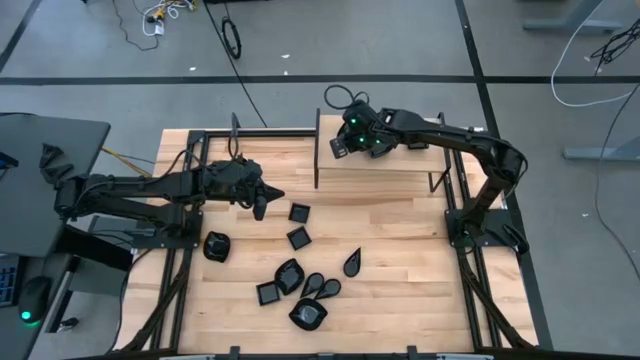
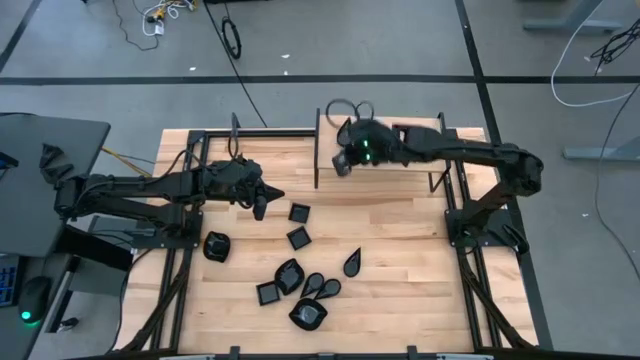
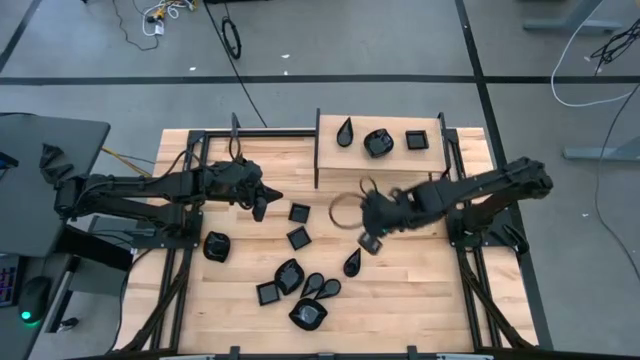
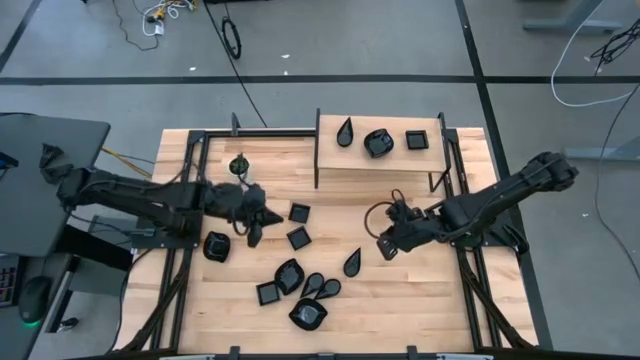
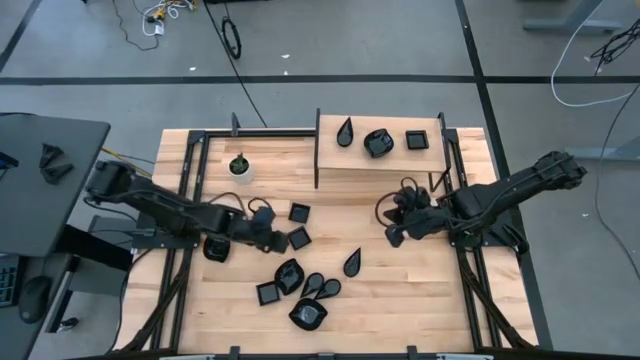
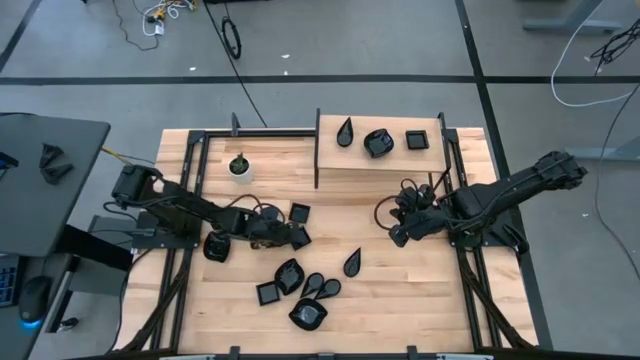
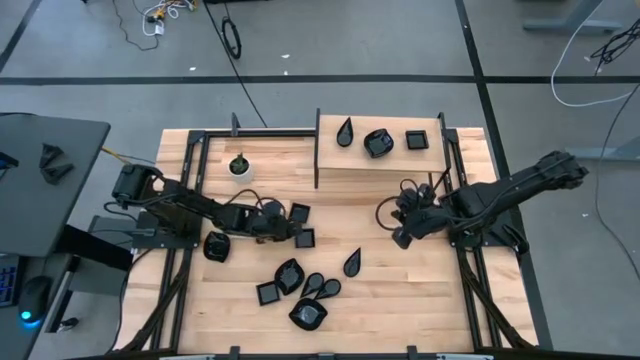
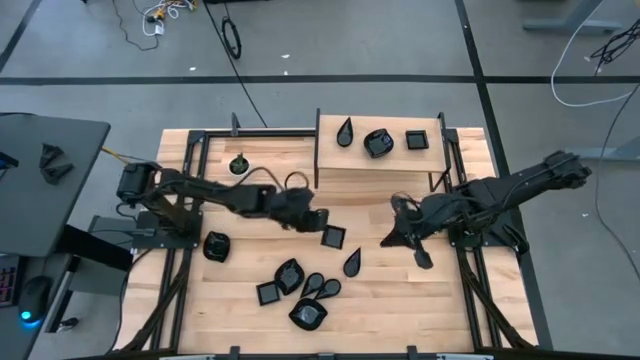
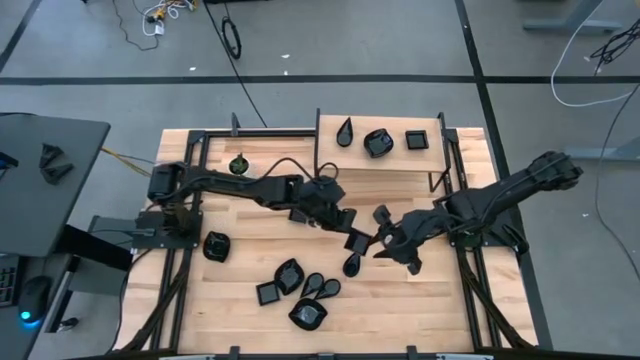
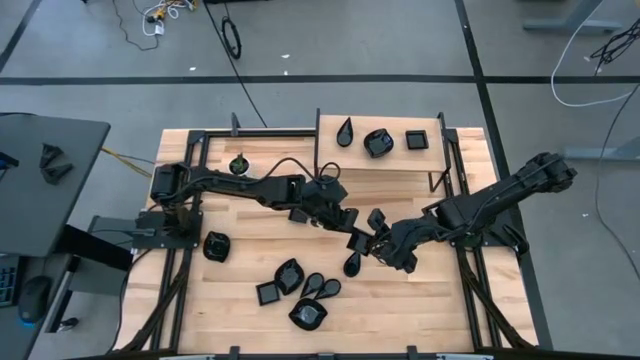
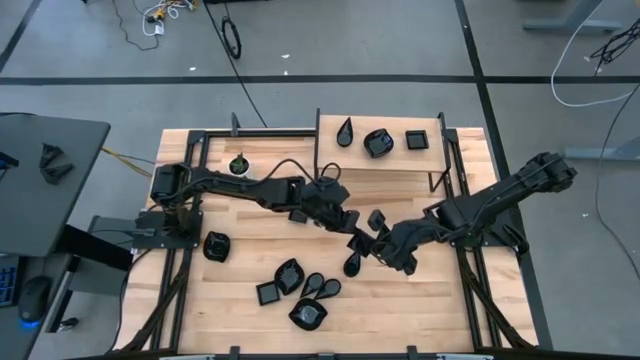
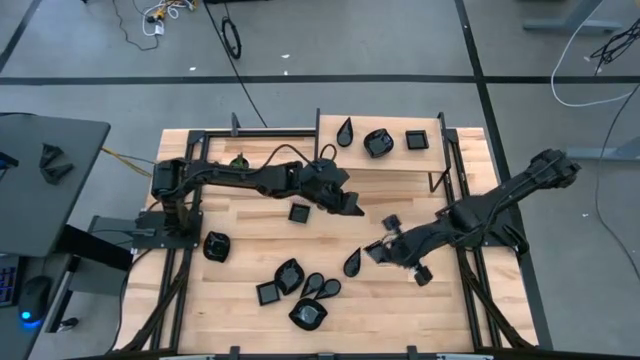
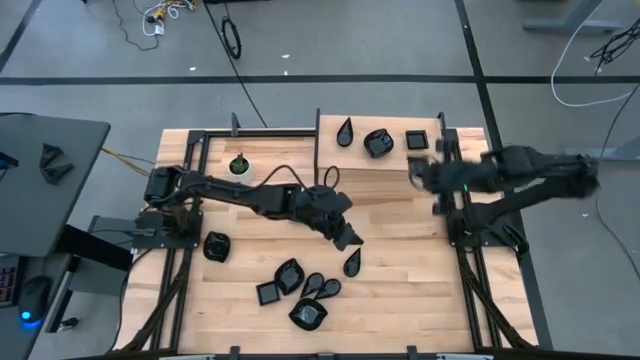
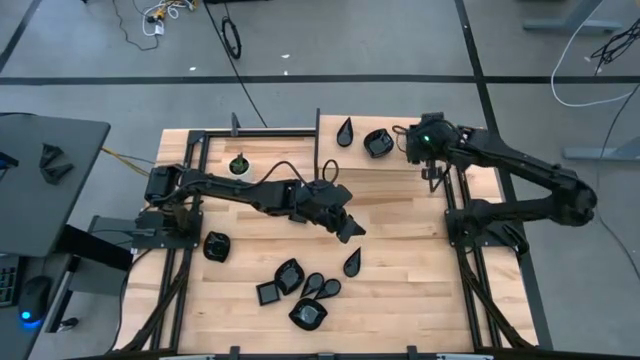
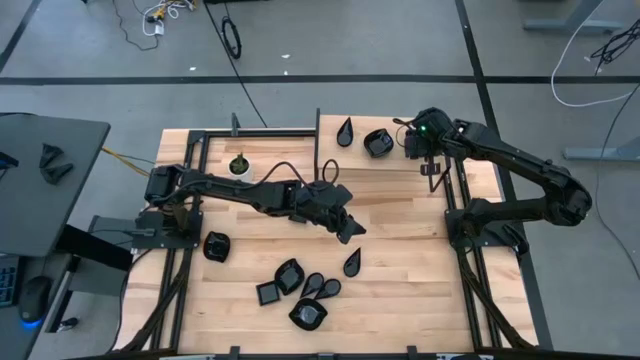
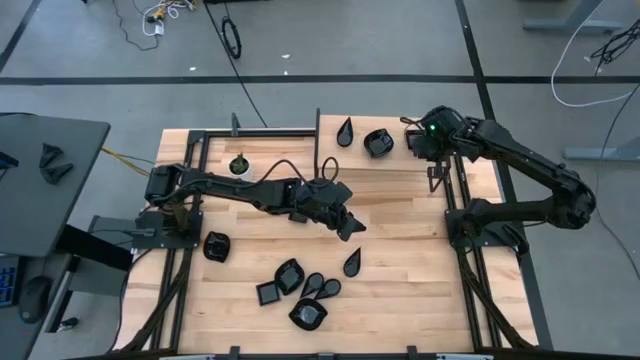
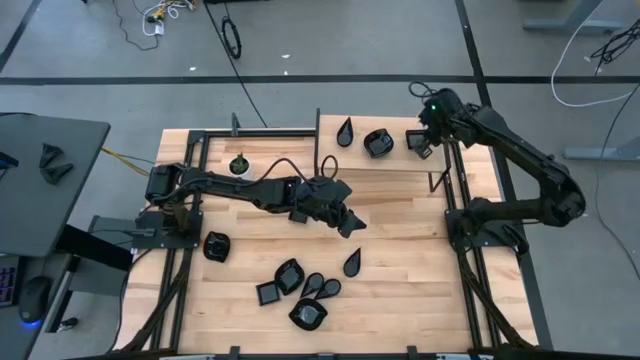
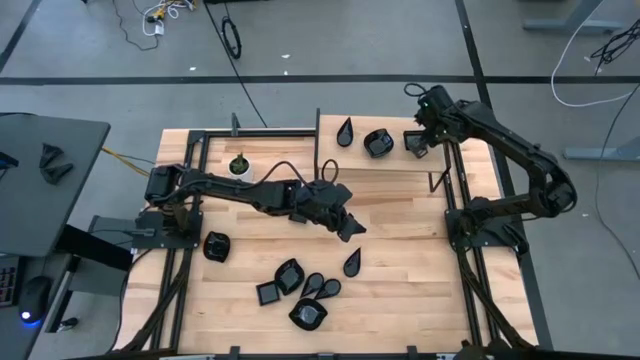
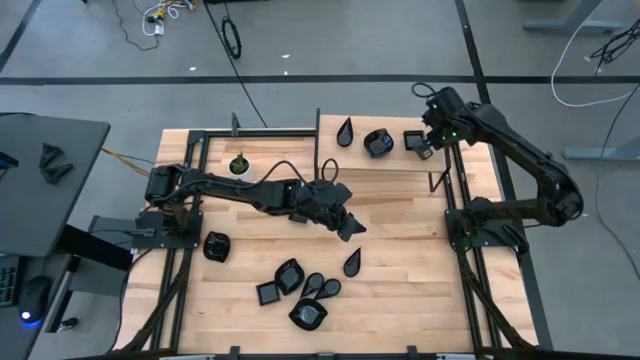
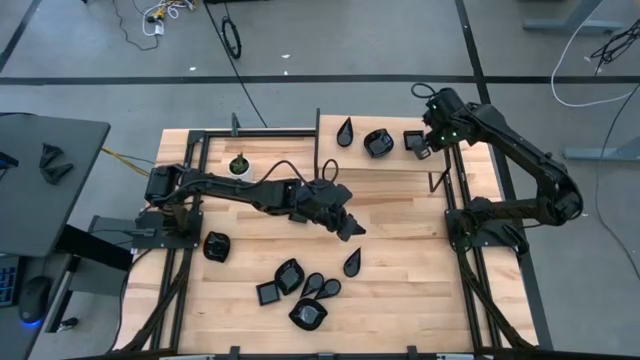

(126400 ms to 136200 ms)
Task: Pick & Place Mini shaped plates
Stack the square plate on top of the square plate on the shelf

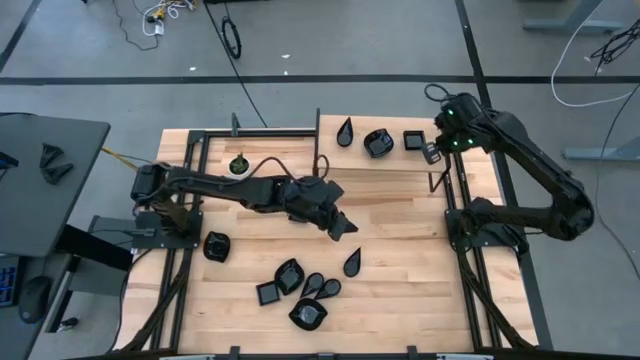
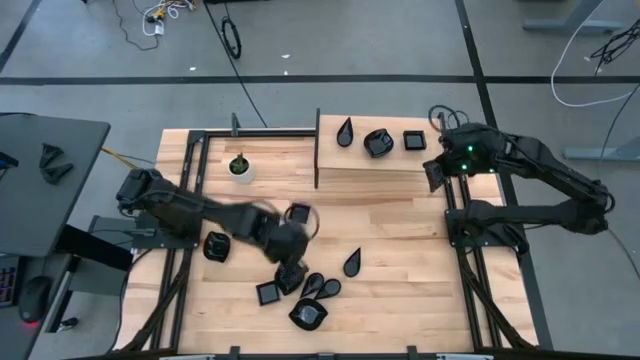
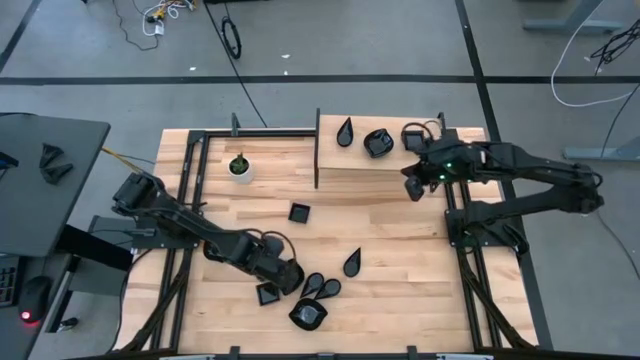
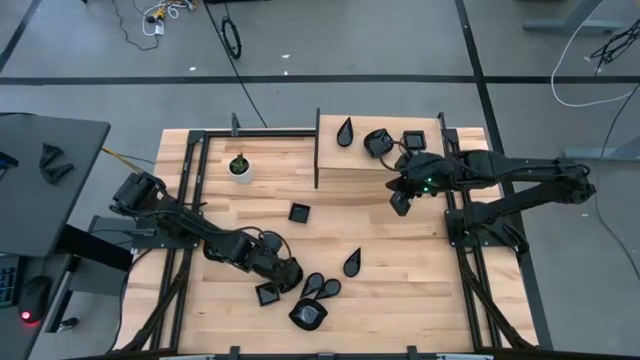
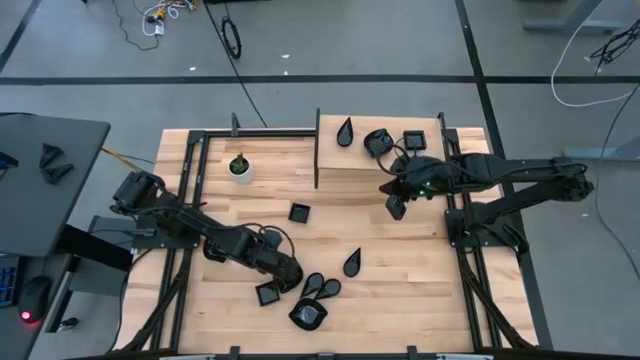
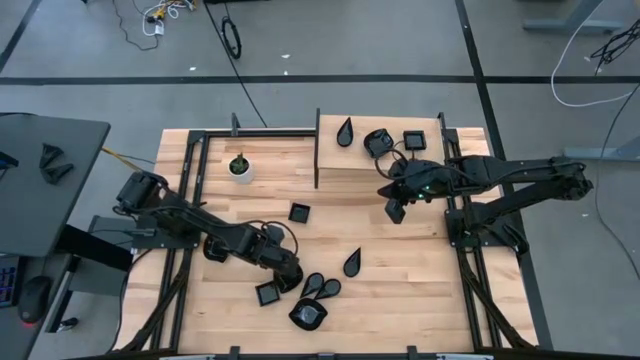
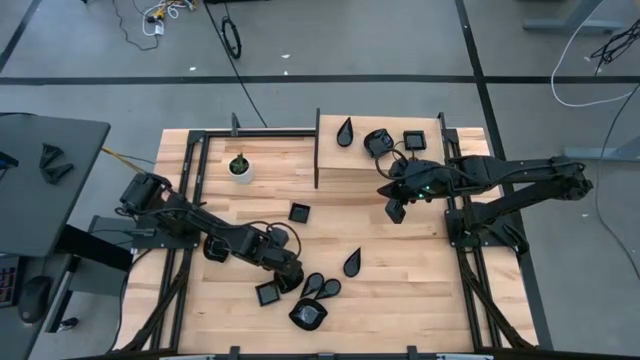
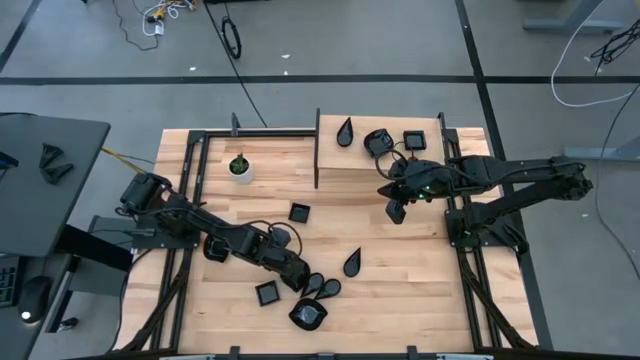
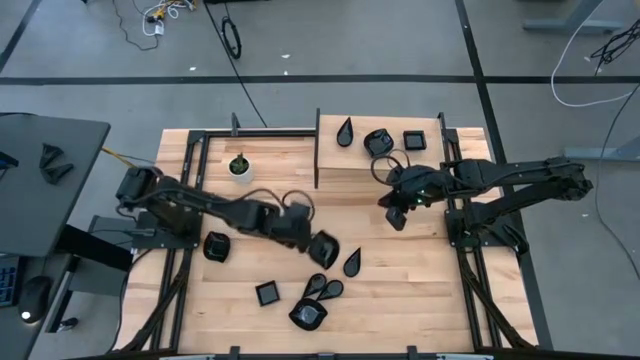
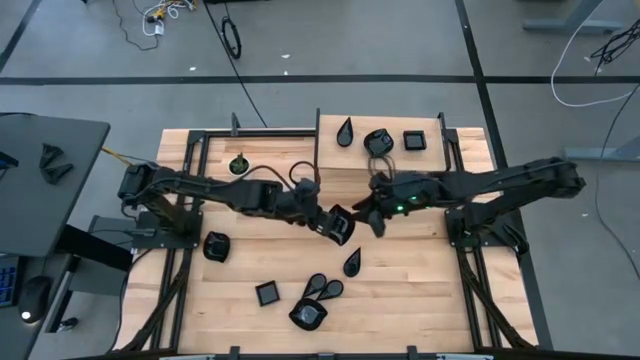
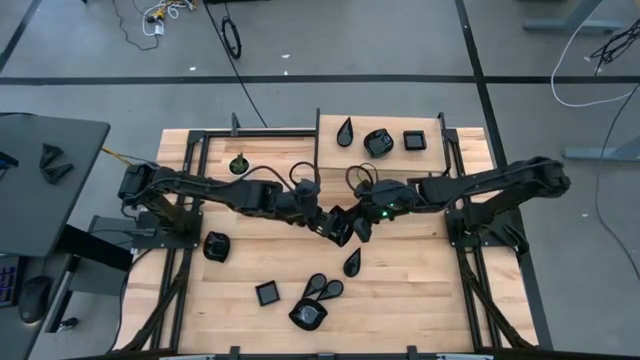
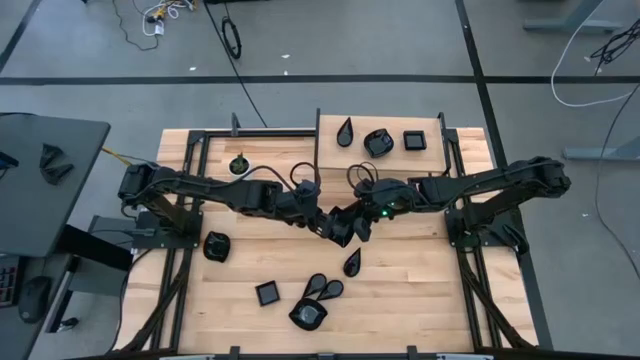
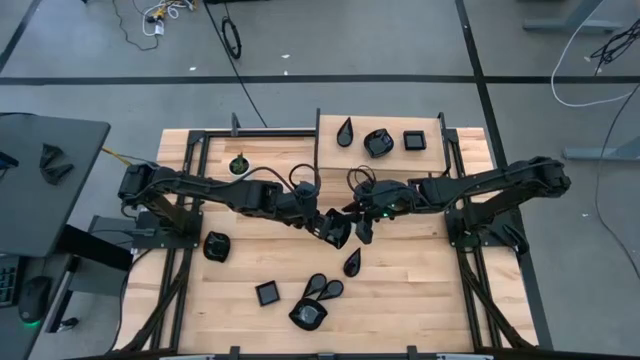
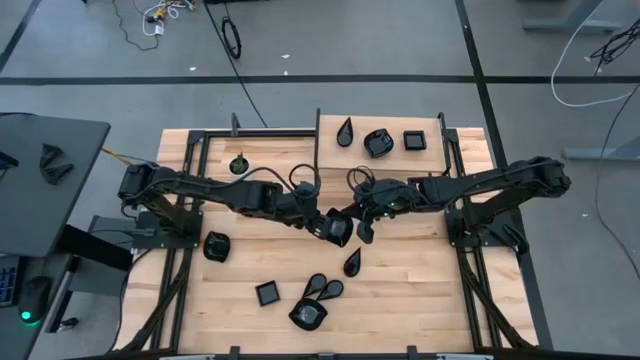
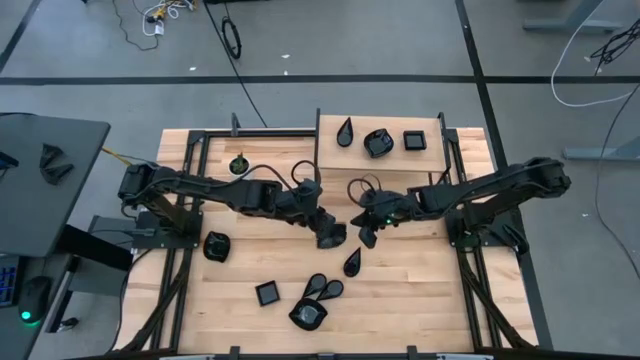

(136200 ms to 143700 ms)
Stack the leaf-shaped plate on top of the leaf-shaped plate on the shelf

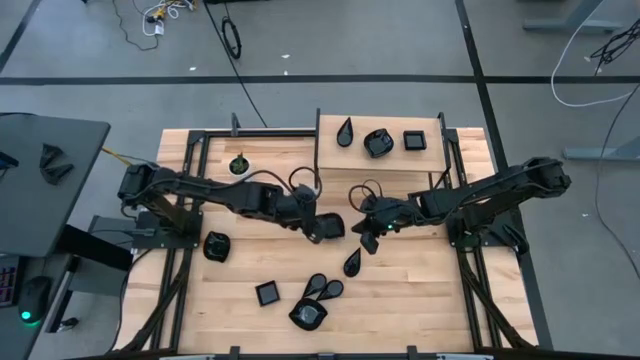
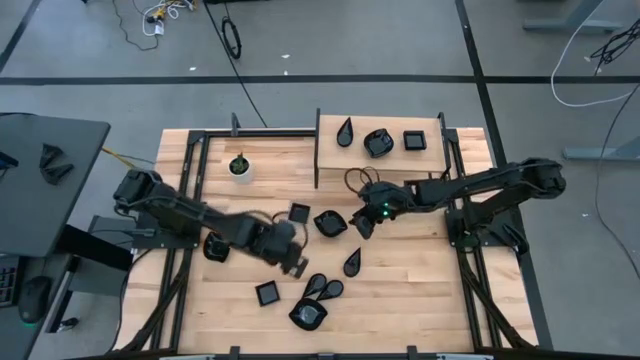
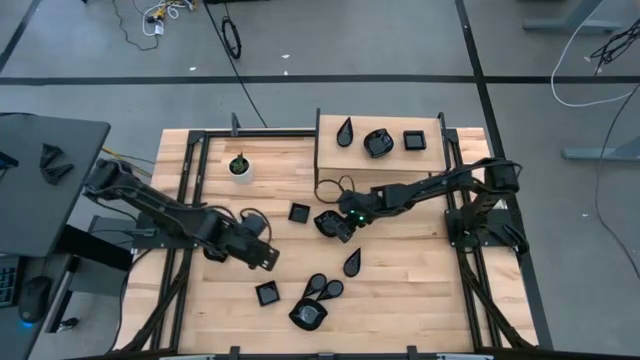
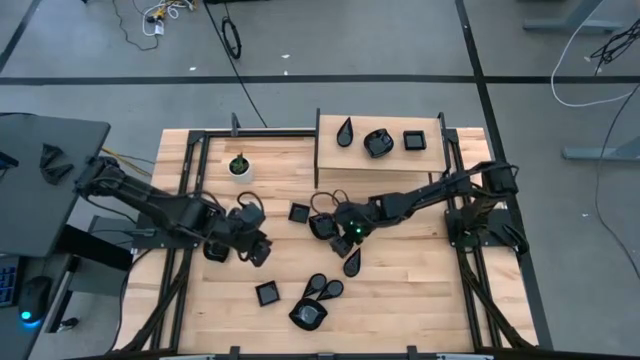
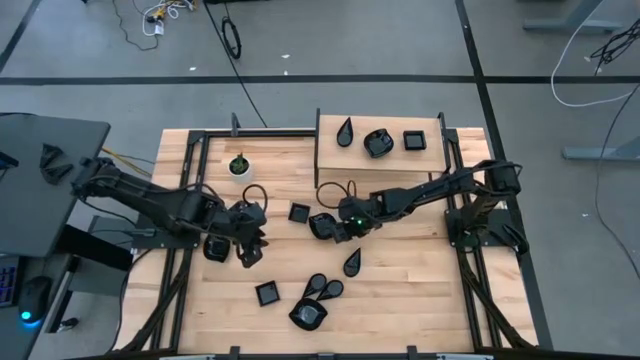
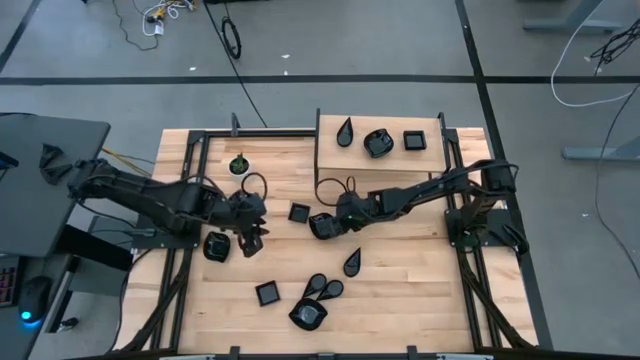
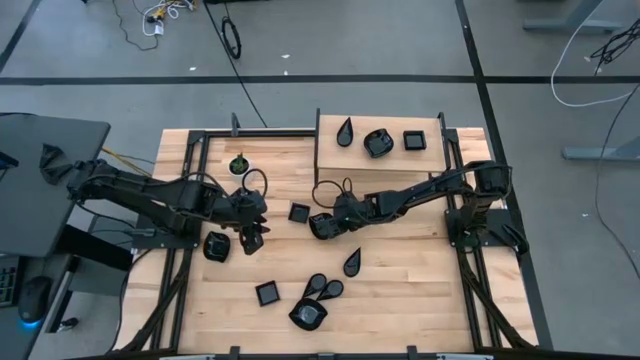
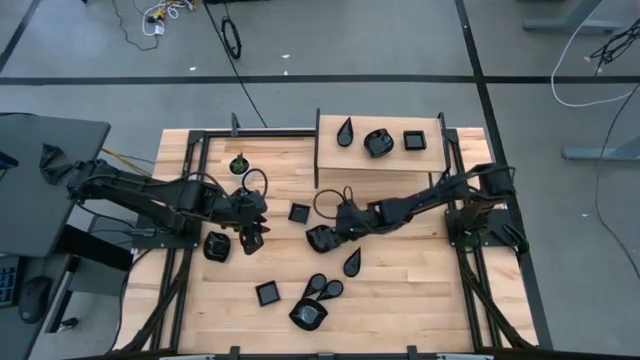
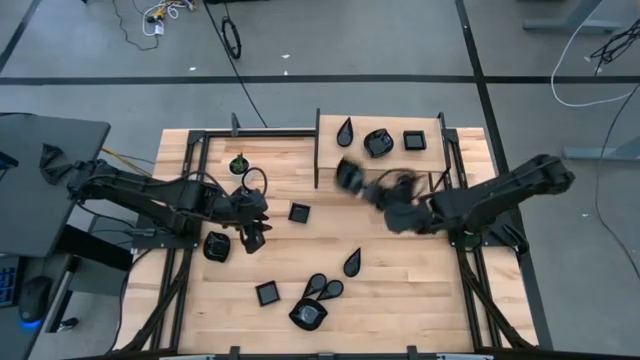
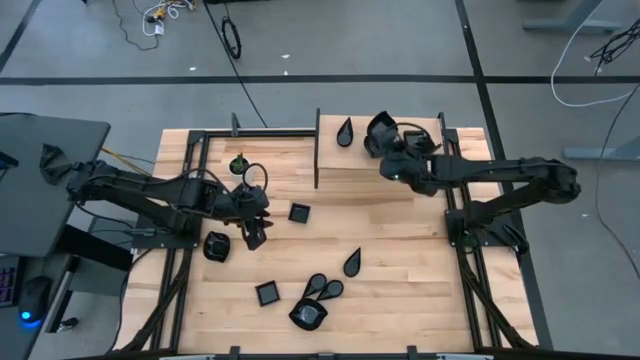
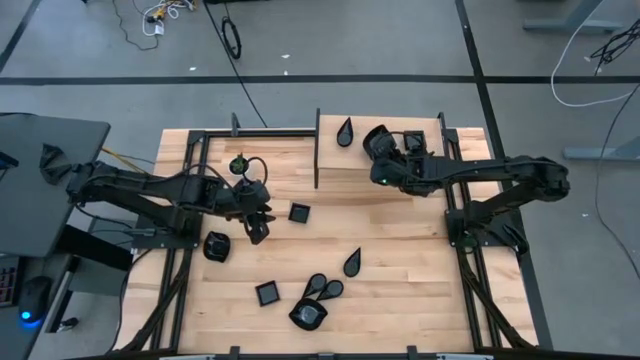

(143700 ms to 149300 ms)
Stack the leaf-shaped plate on top of the leaf-shaped plate on the shelf
